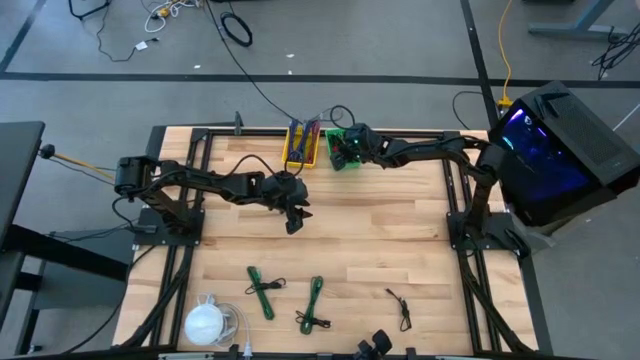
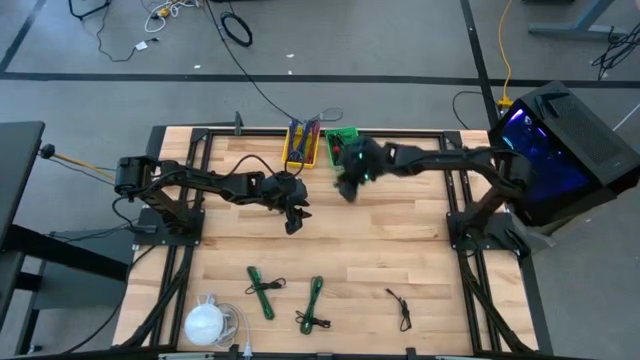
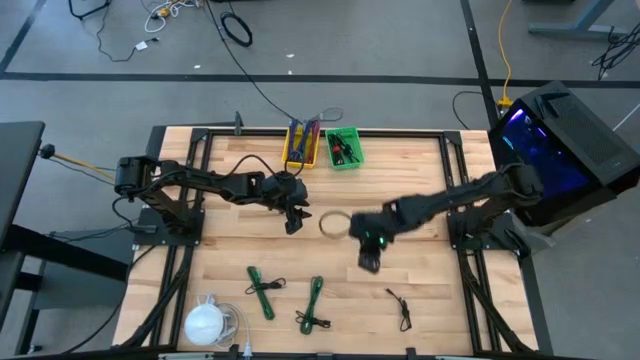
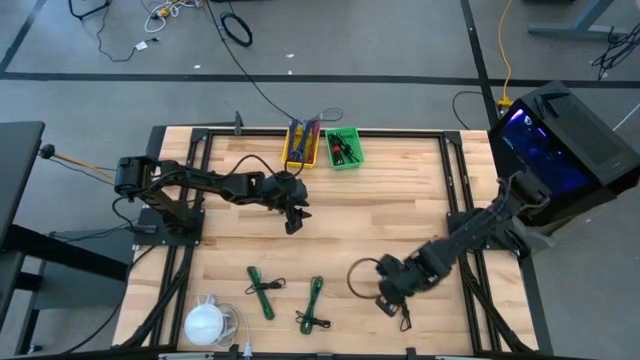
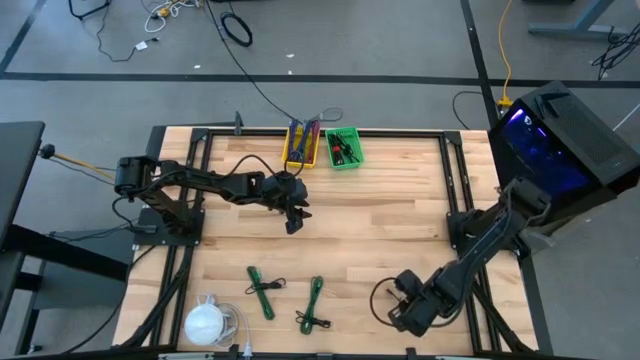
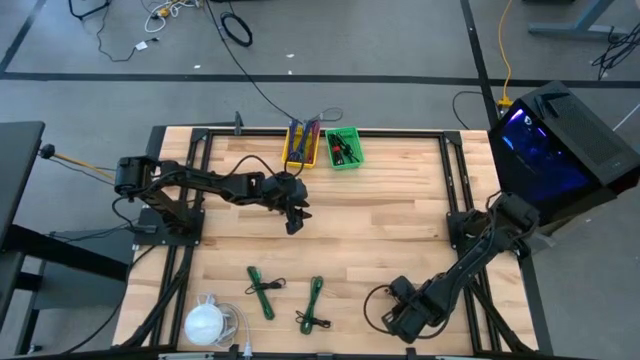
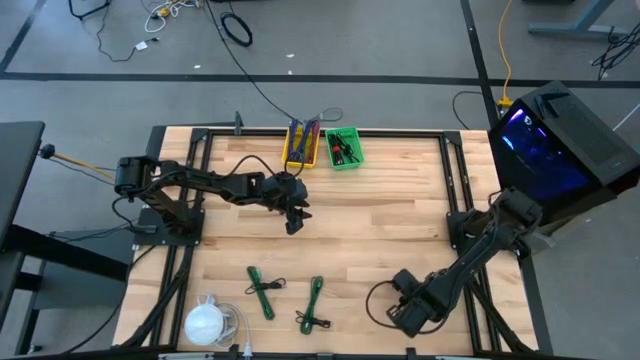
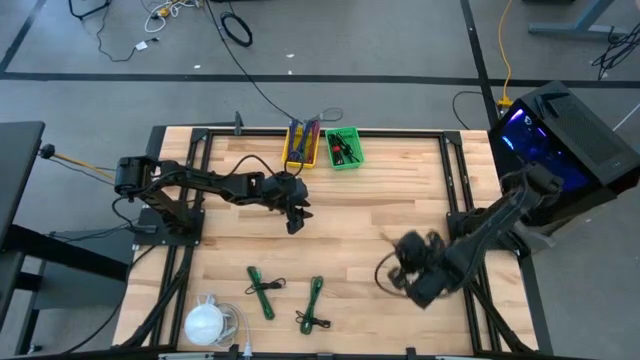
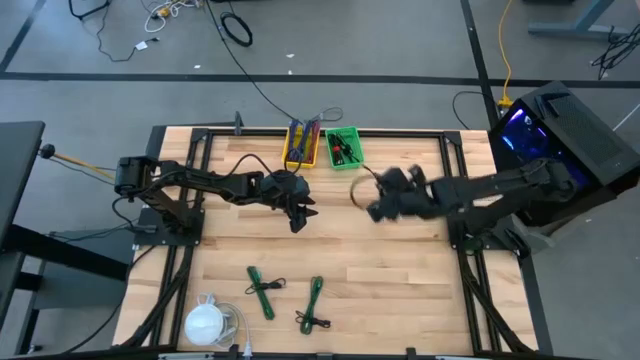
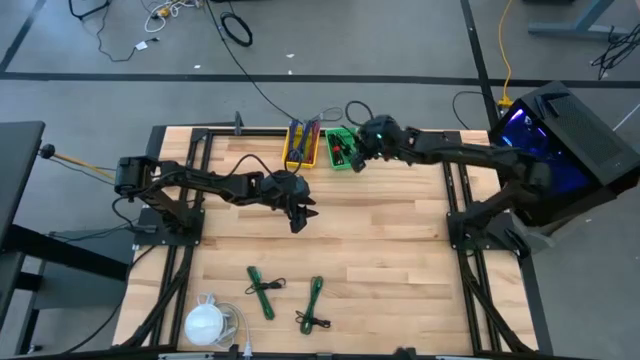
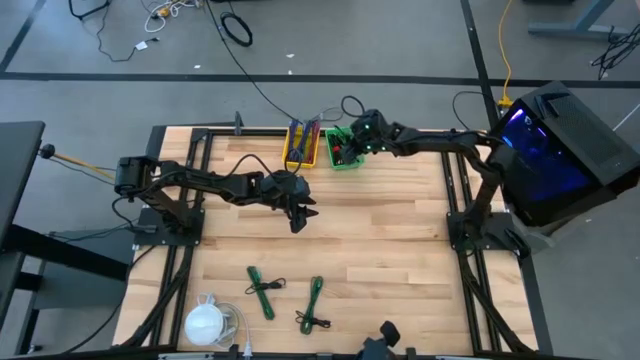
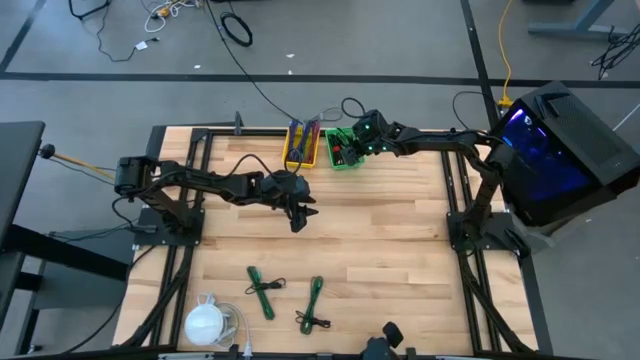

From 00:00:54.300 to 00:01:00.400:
Task: Pick & Place USB Port
Put the black usb cable into the green bin

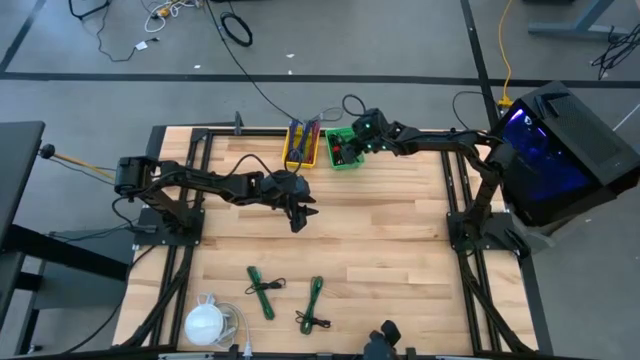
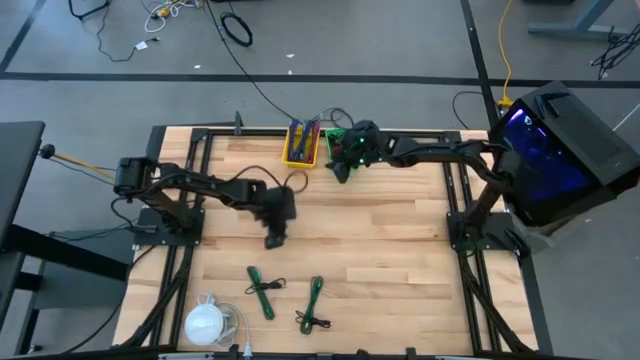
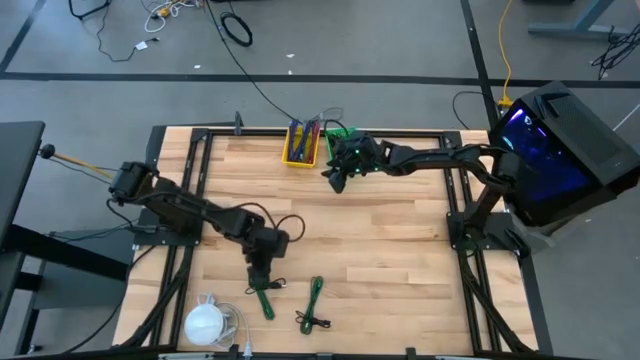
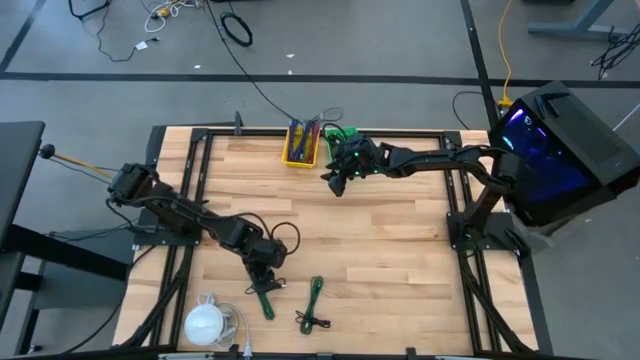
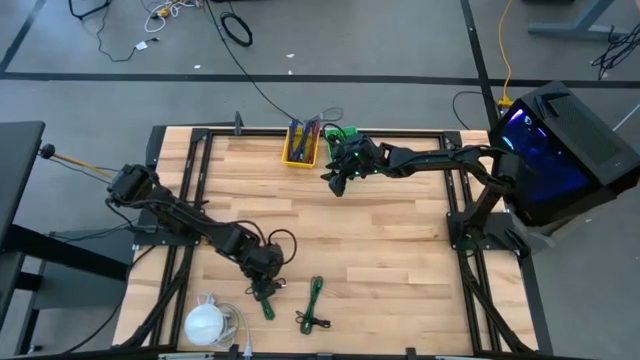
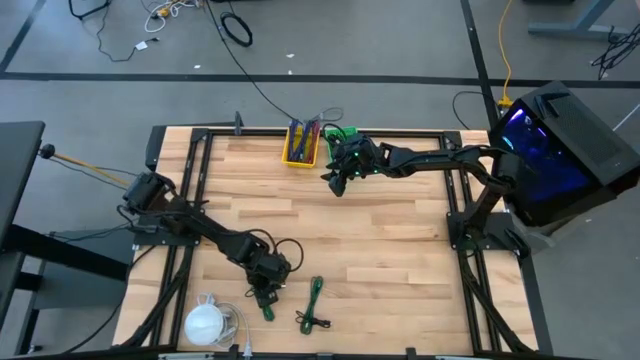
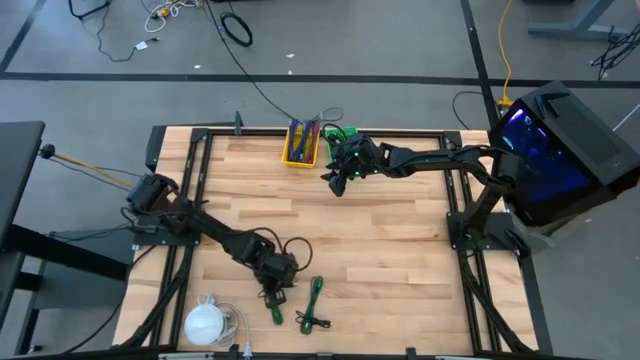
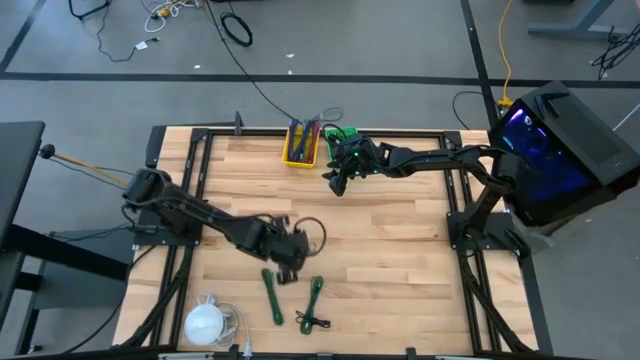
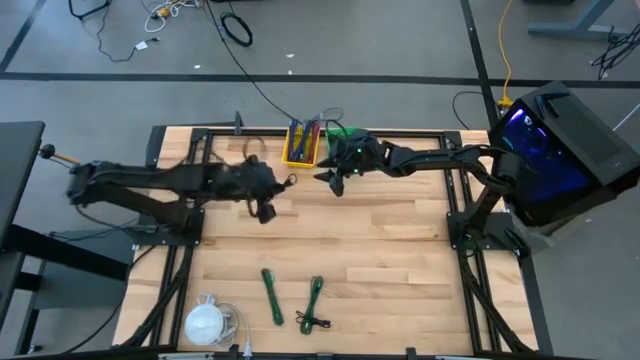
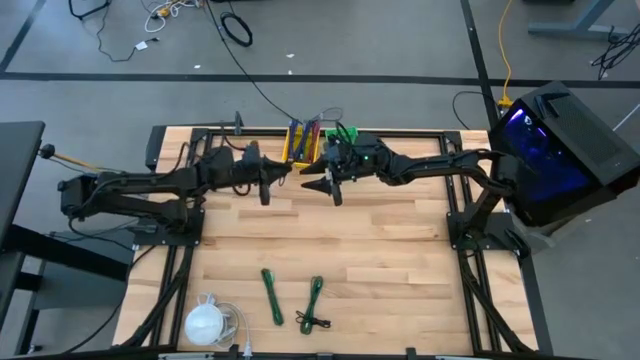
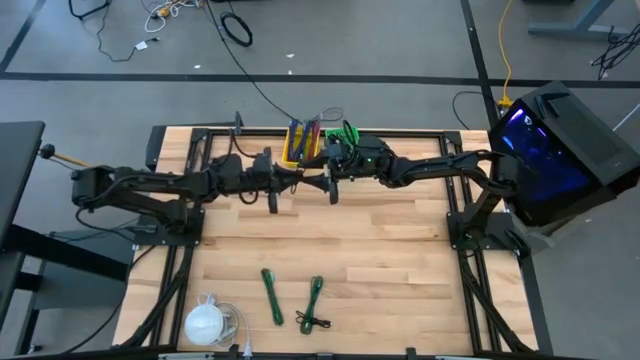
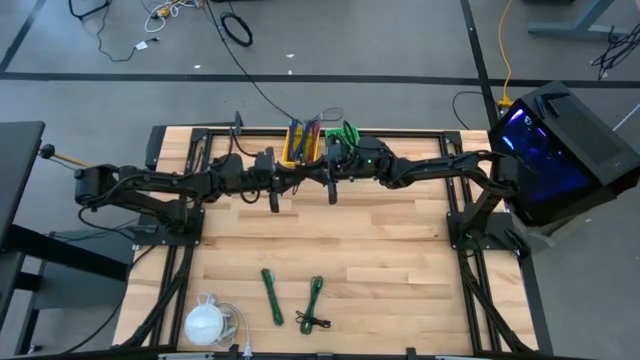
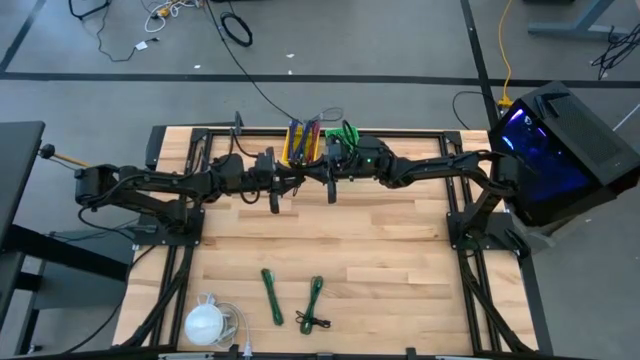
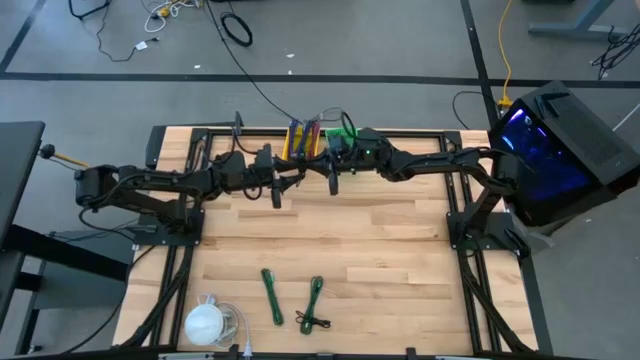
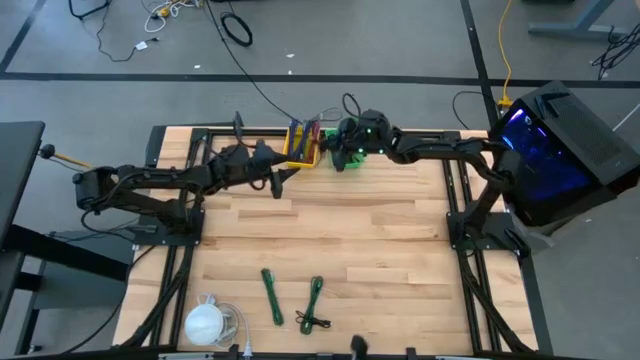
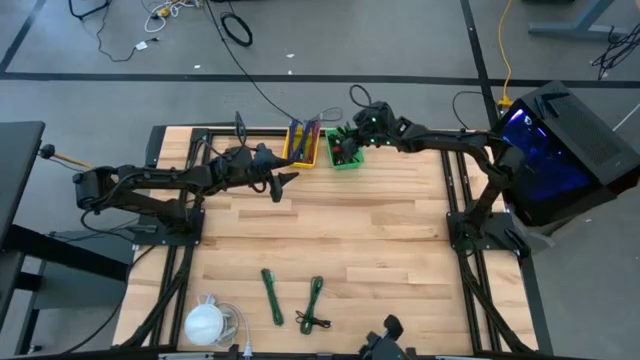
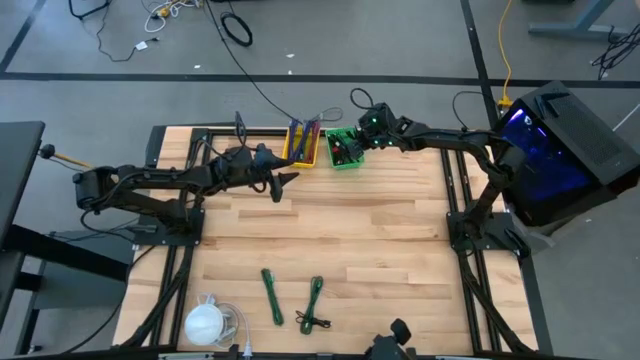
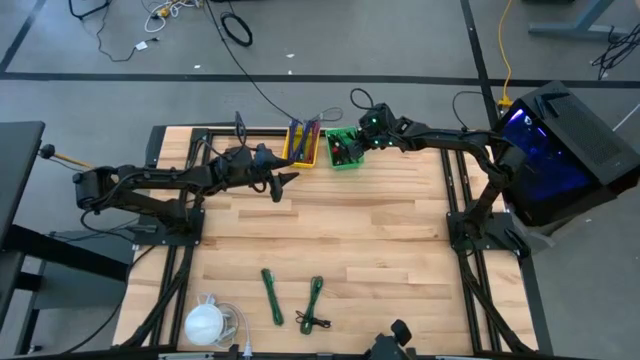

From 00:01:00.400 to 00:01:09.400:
Put the black usb cable into the green bin

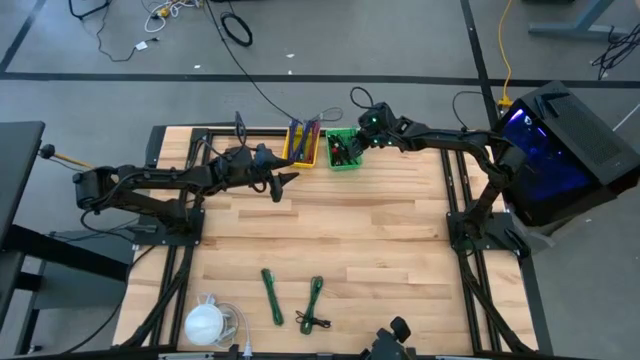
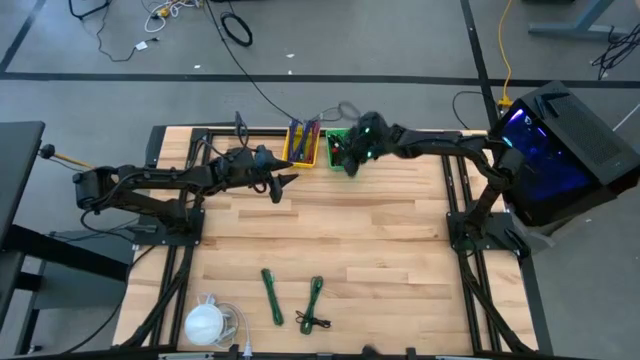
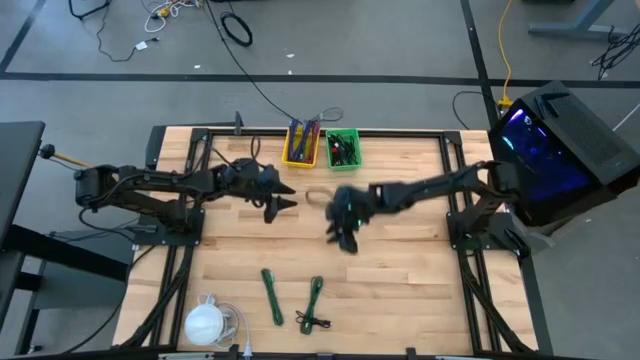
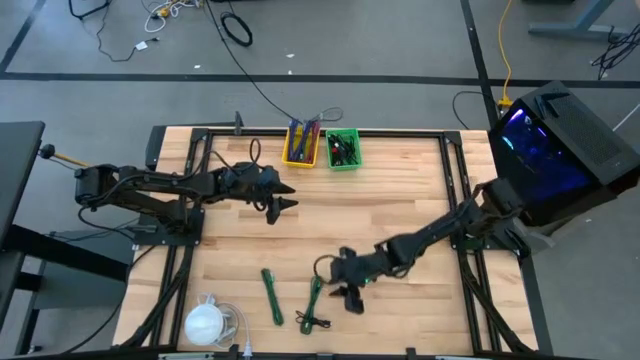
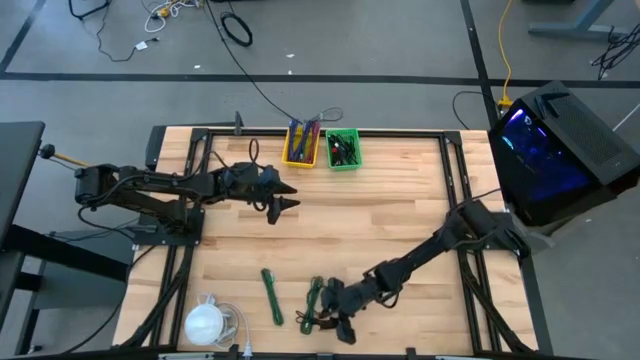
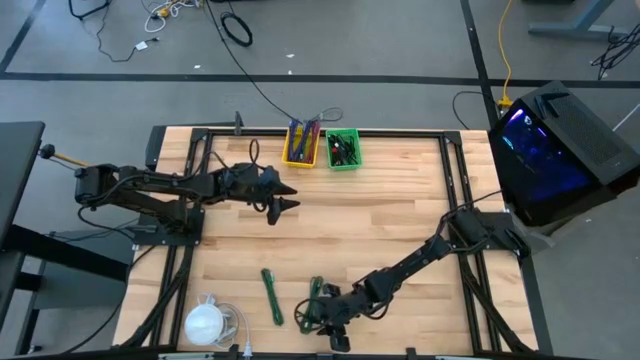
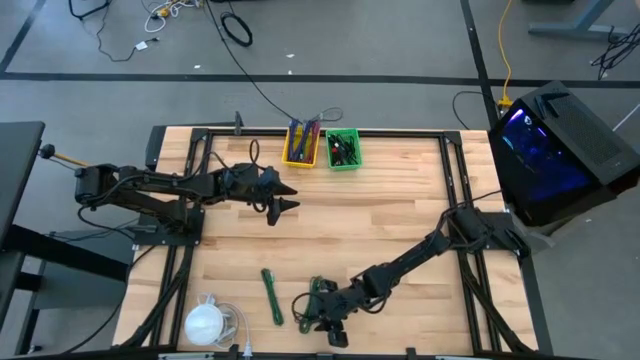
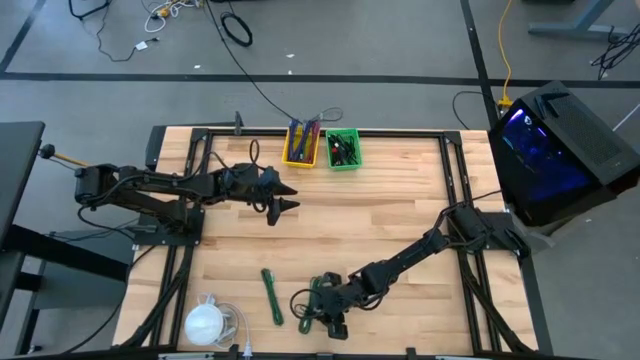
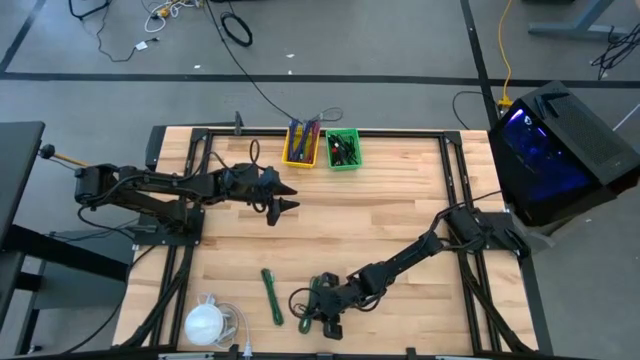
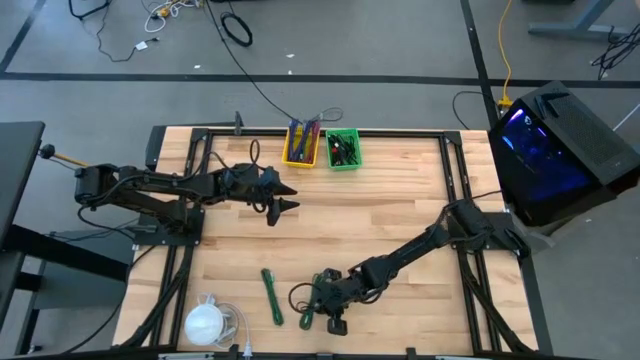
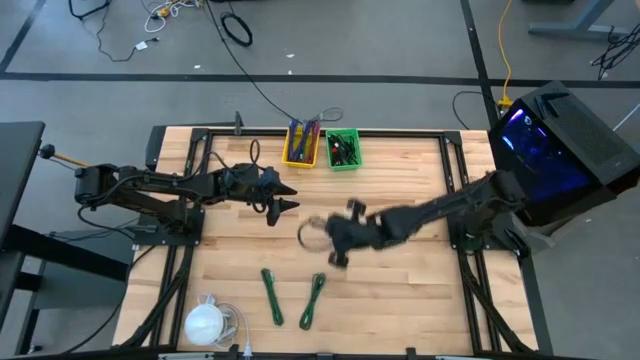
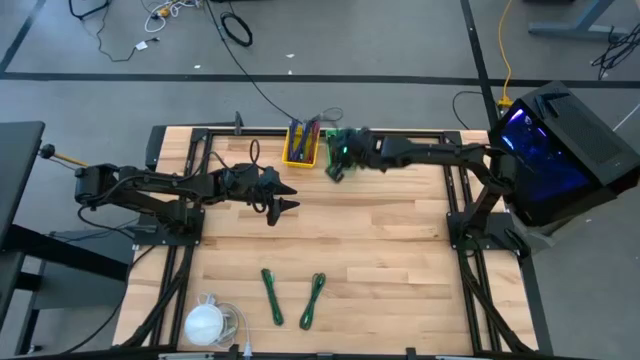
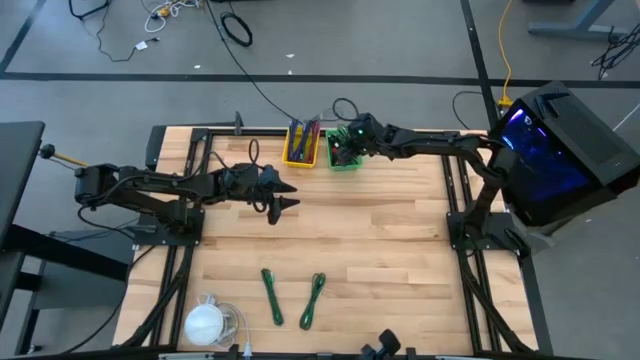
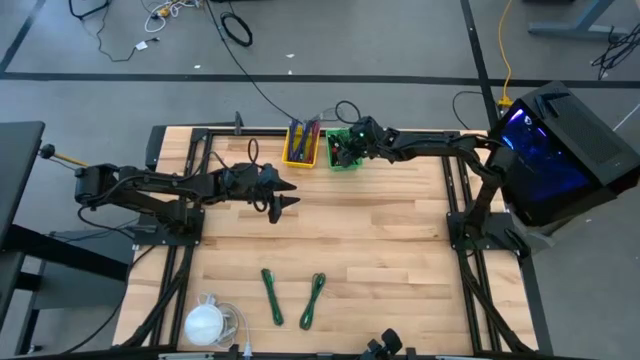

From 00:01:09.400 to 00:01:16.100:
Put the black usb cable into the green bin
